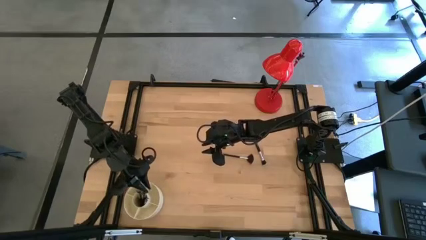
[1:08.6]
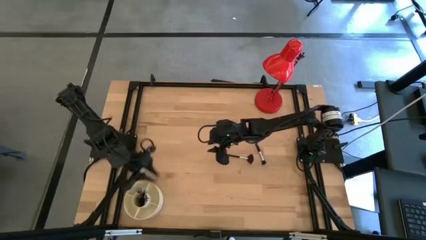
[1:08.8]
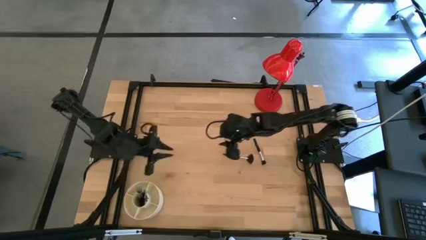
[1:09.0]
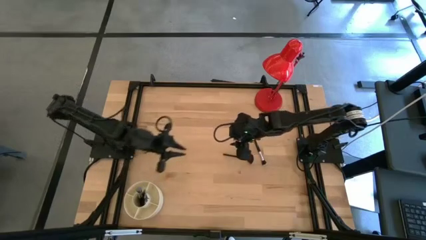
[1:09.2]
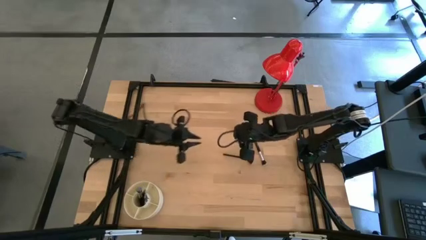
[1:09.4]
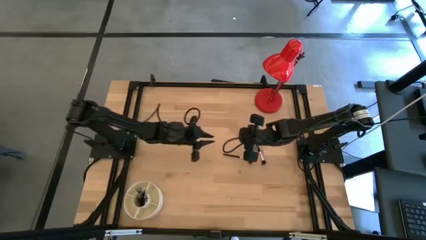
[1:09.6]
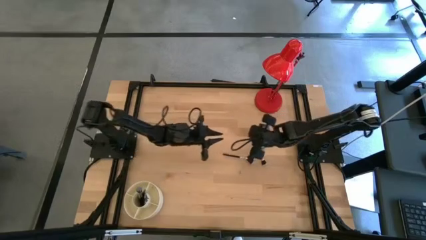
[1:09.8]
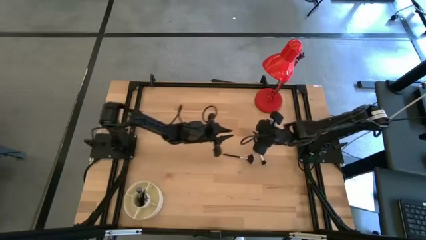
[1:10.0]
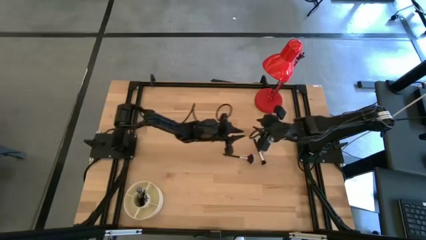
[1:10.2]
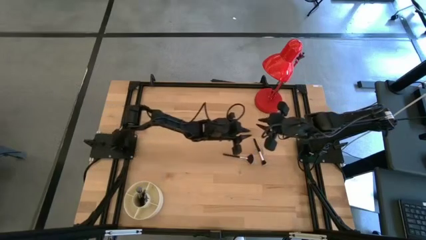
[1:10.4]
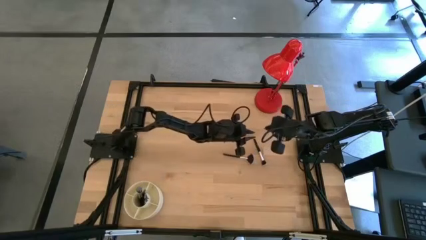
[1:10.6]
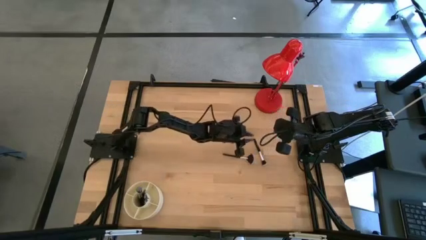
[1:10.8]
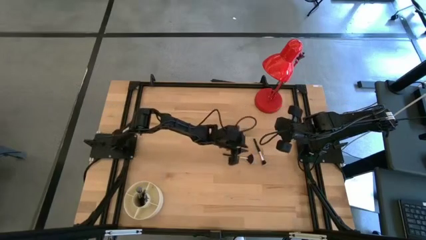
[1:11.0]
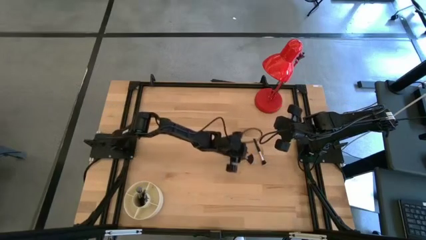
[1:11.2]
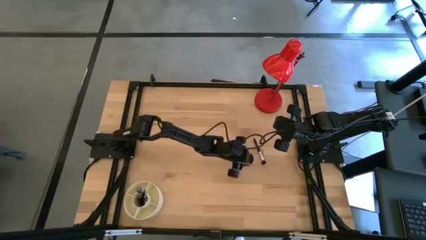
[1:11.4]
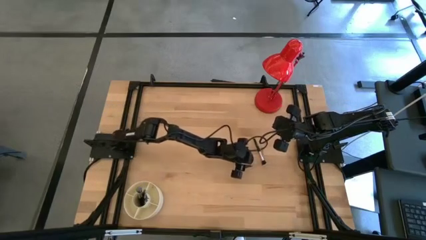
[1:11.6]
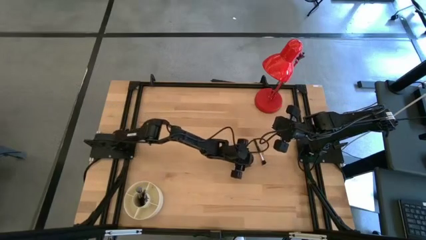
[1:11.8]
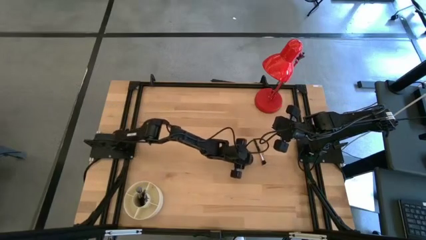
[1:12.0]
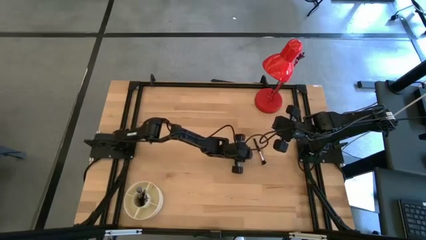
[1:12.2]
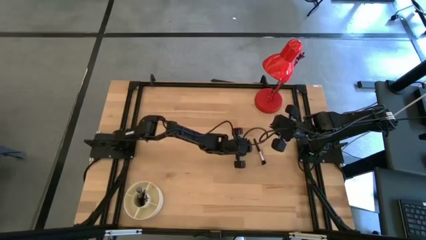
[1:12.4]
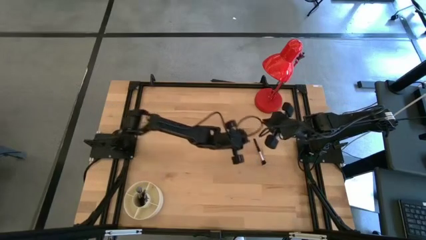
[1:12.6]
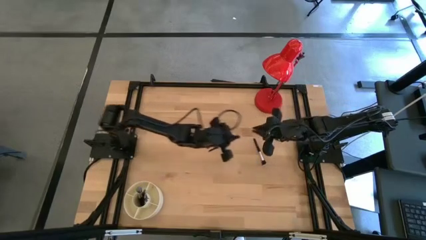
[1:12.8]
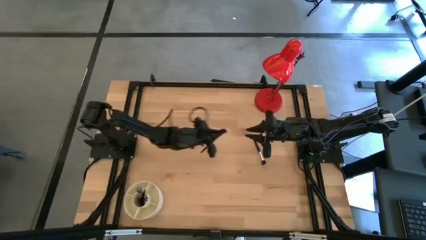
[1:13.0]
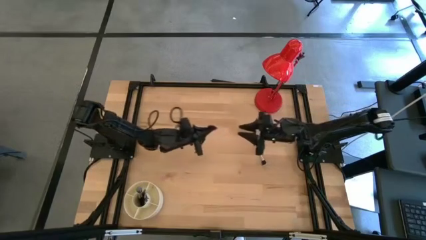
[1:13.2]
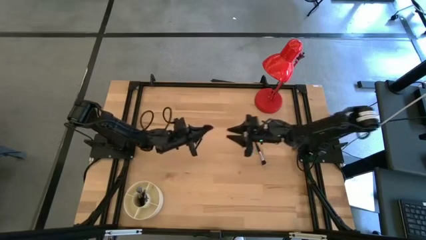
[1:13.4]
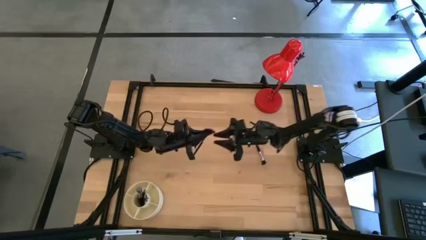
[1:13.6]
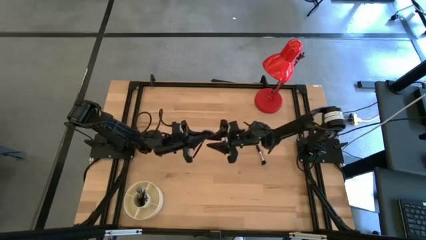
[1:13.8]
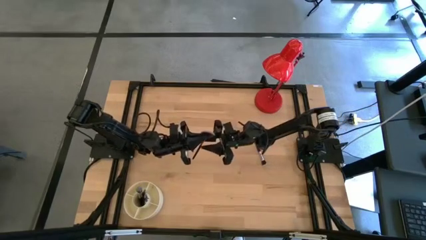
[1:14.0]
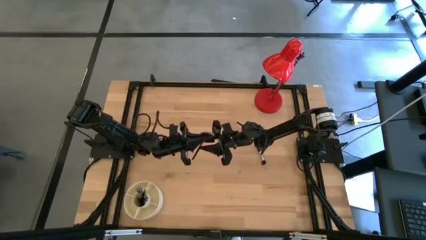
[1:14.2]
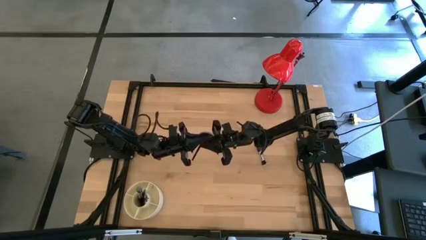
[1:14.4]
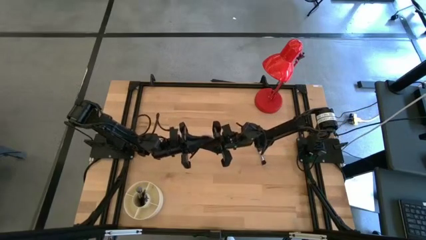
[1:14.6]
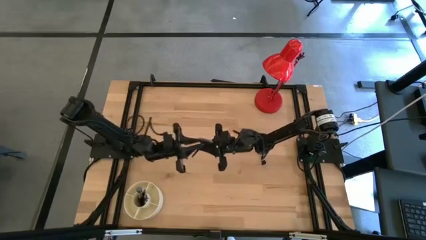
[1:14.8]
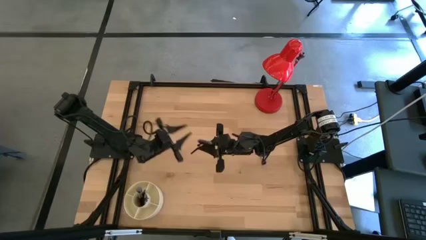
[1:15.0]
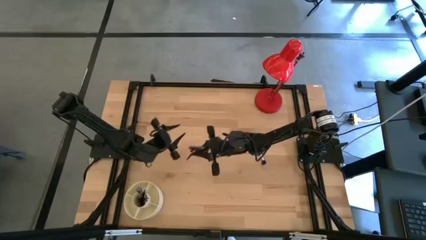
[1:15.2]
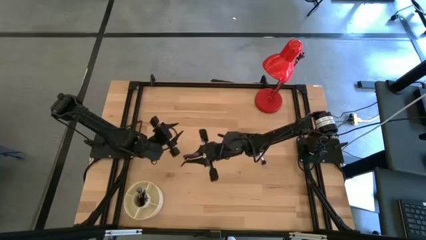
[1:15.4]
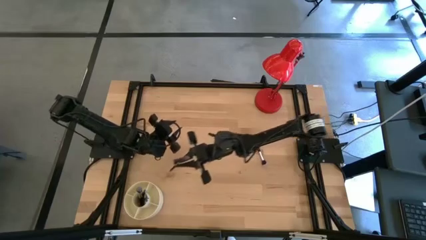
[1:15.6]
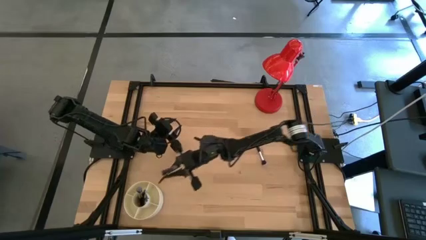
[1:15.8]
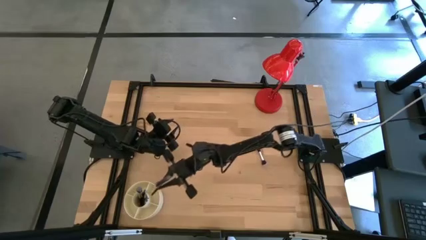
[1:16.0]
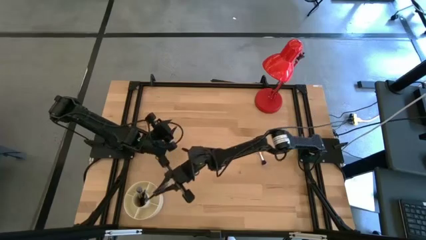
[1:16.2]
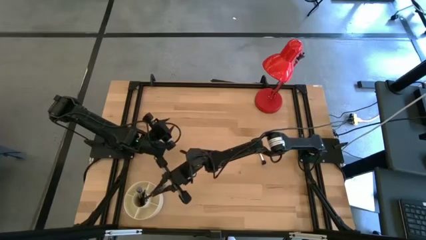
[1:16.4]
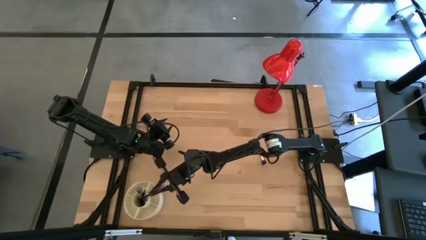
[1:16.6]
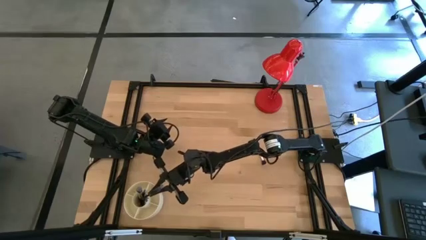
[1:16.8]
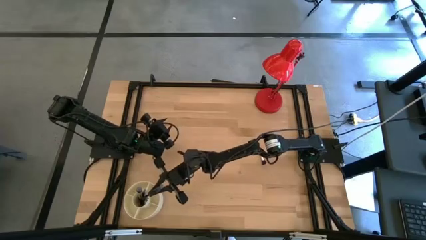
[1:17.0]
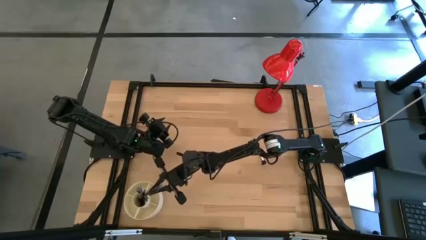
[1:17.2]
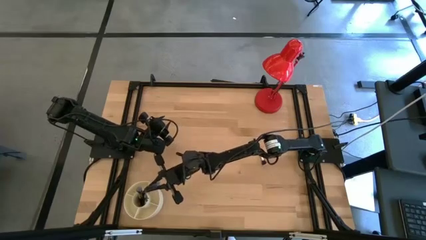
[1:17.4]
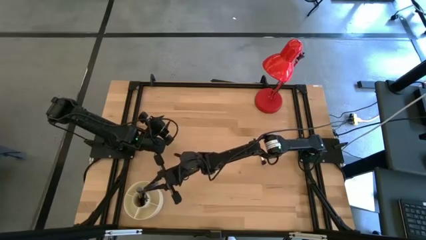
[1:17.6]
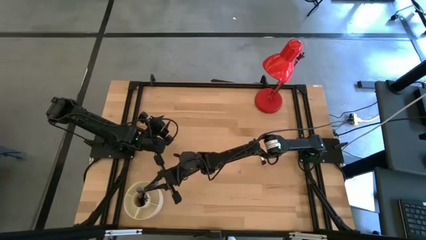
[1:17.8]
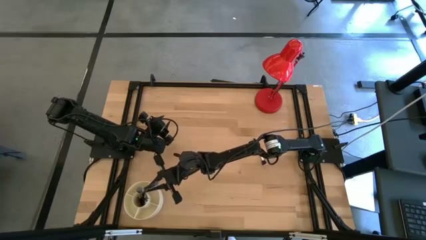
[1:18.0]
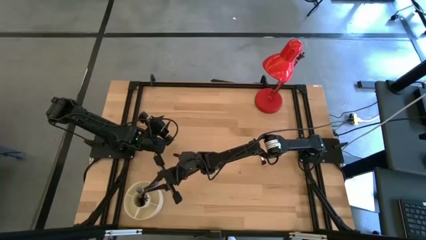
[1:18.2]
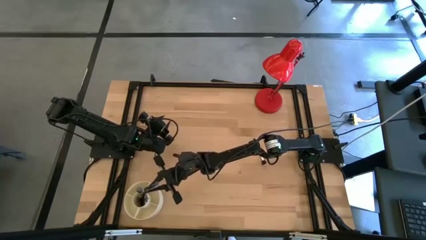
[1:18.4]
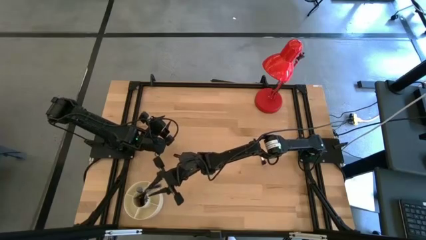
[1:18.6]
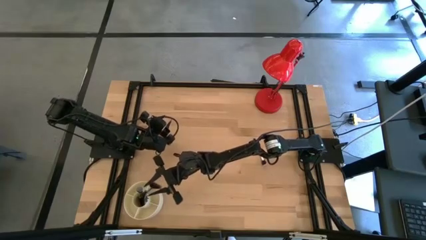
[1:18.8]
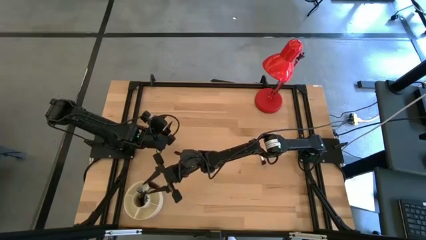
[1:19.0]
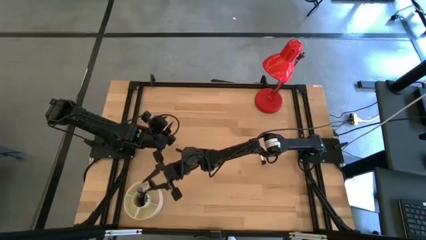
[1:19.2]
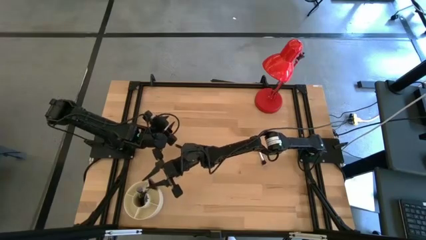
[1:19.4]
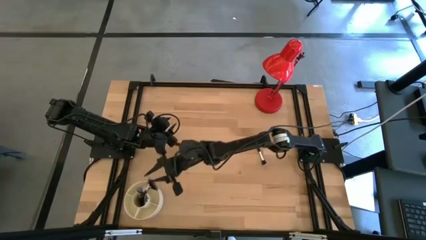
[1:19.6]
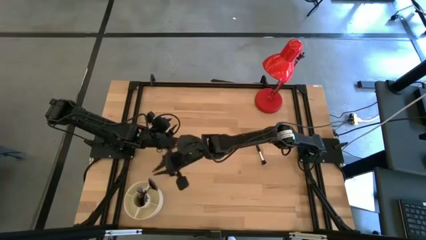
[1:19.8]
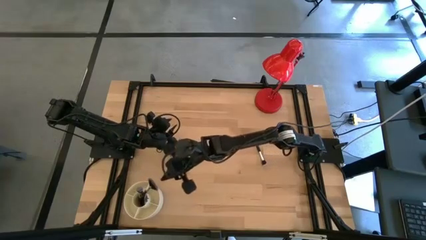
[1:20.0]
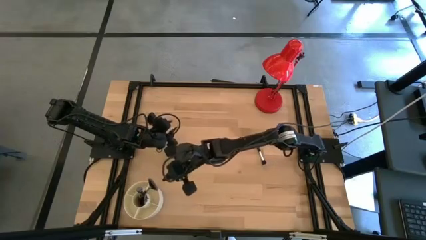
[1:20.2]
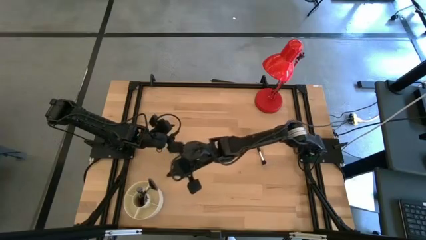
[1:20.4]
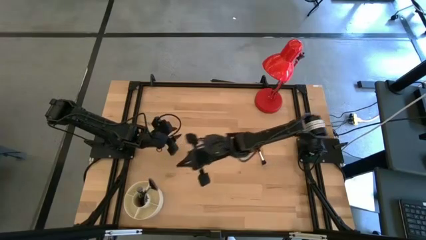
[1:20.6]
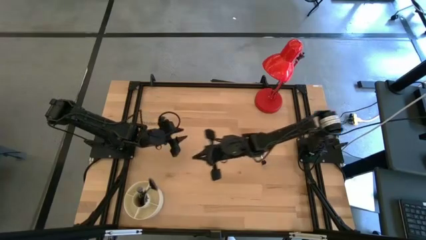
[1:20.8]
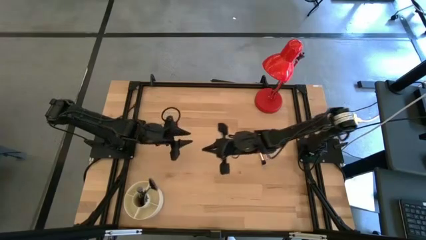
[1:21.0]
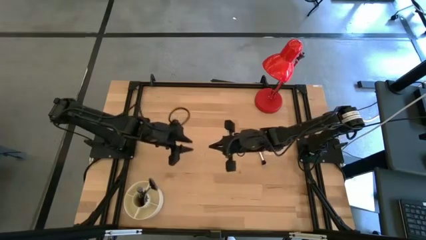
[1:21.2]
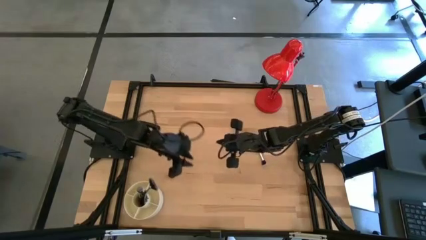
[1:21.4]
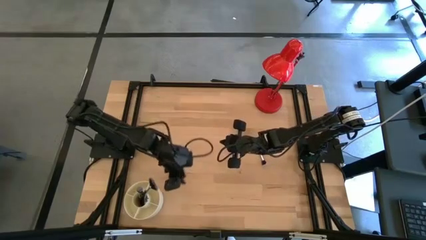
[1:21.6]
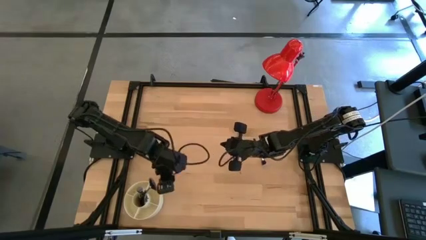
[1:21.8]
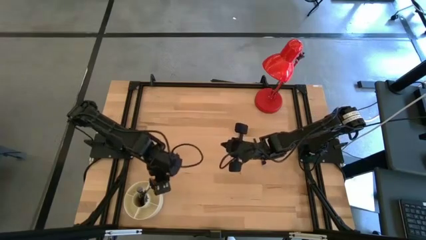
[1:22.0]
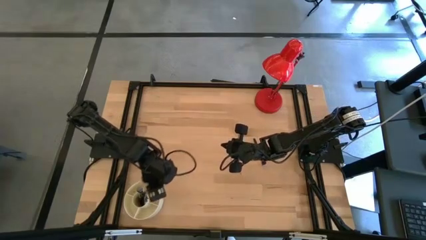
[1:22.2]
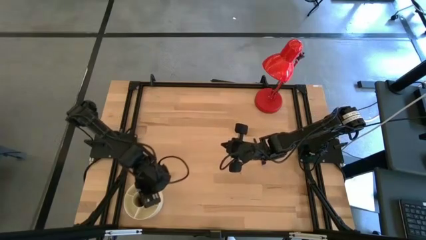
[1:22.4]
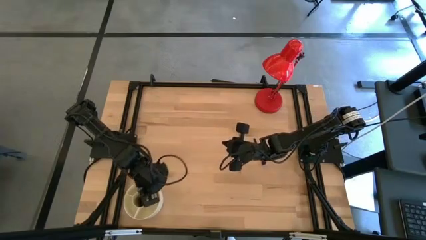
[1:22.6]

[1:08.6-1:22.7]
Task: Pick & Place Makeup Brushes
Put the black highlighter brush into the makeup organizer

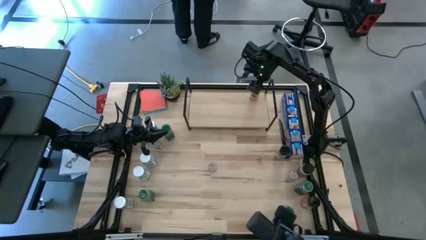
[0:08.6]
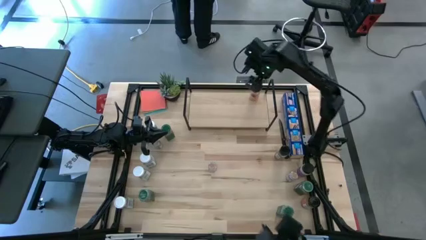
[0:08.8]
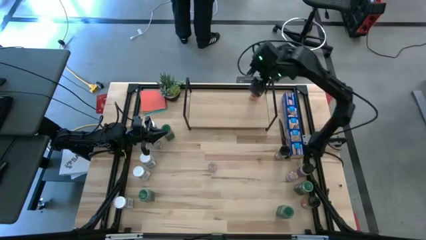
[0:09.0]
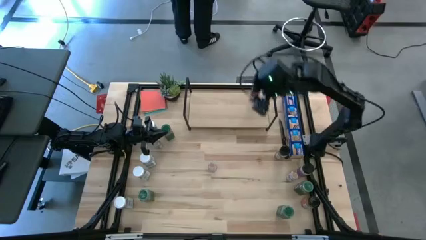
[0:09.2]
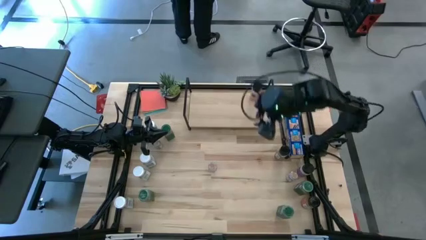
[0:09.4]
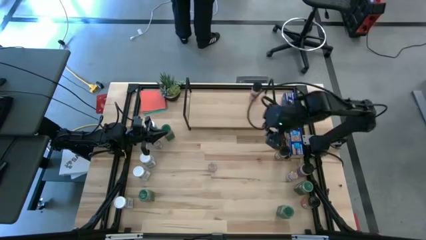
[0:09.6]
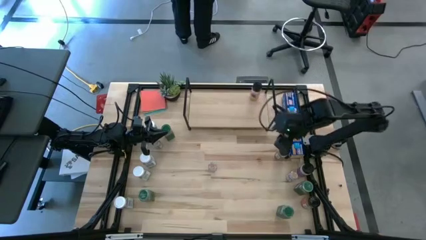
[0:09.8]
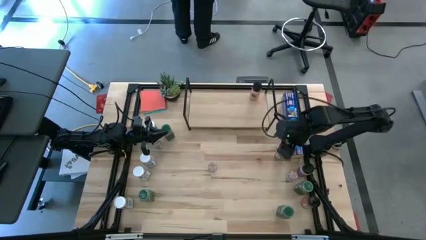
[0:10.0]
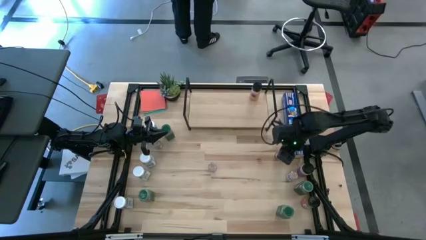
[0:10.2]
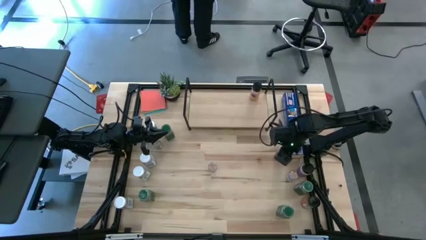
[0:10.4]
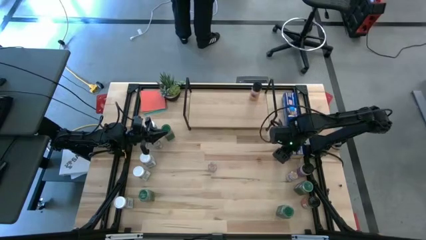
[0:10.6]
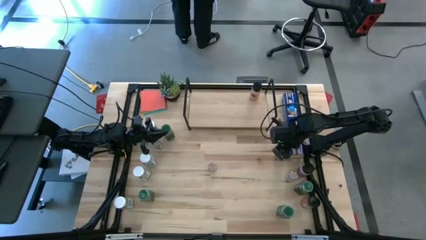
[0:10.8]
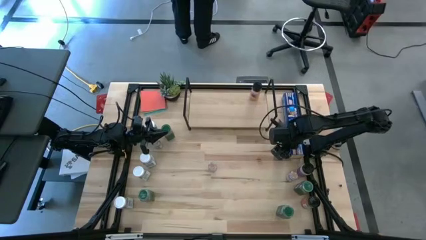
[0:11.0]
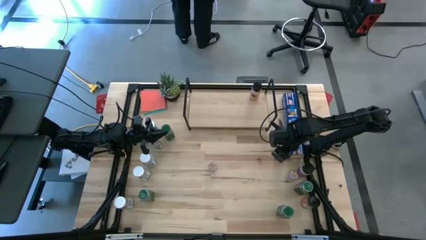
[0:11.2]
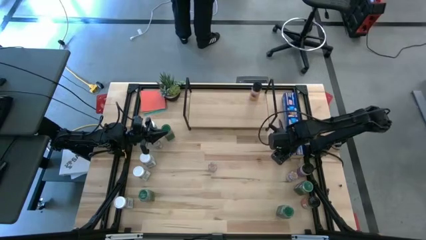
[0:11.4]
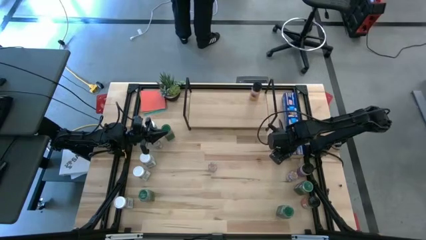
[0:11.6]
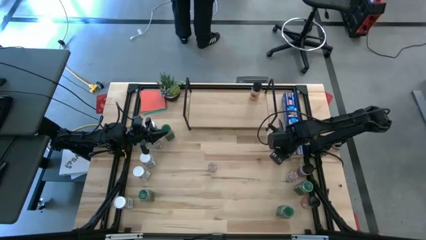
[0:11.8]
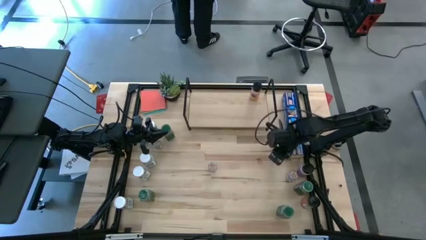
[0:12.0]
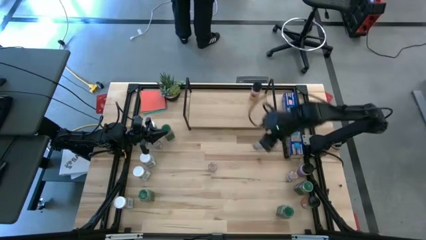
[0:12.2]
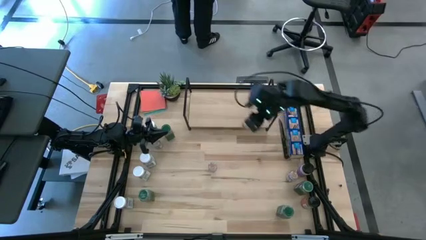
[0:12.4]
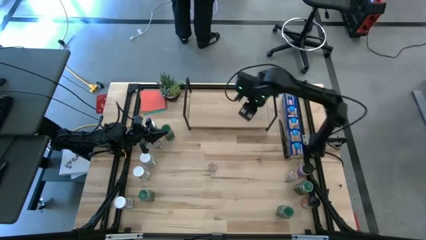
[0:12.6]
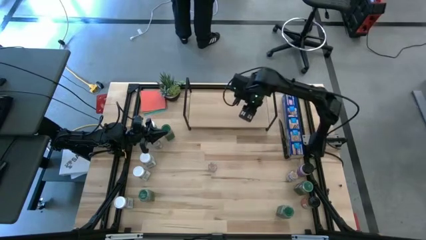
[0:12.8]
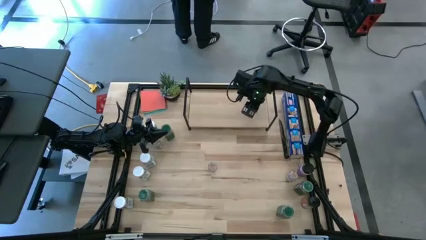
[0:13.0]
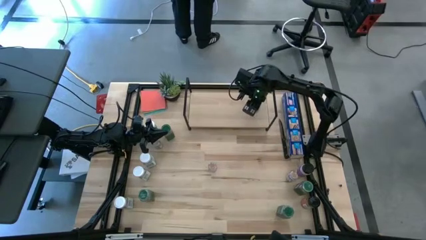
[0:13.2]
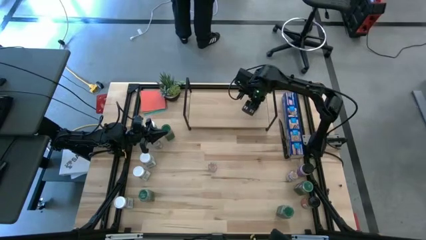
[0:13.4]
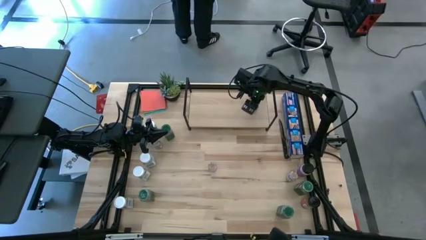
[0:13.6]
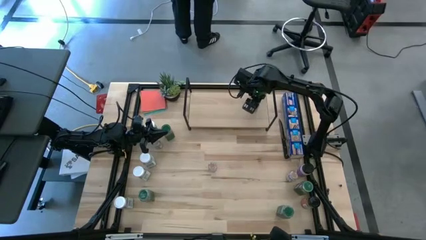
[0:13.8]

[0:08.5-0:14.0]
Task: Shelf spices
Put the black green seasoning bottle on the shelf, aligned with the black orange seasoning bottle
